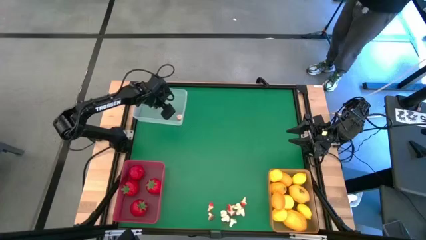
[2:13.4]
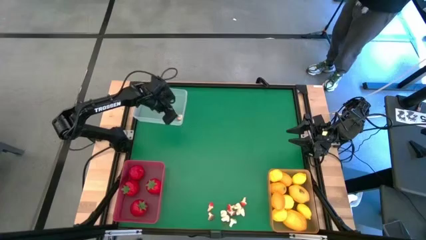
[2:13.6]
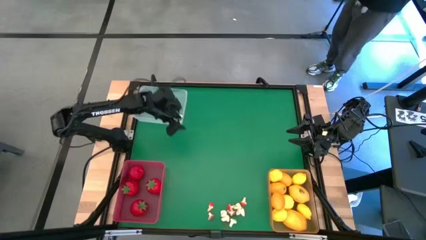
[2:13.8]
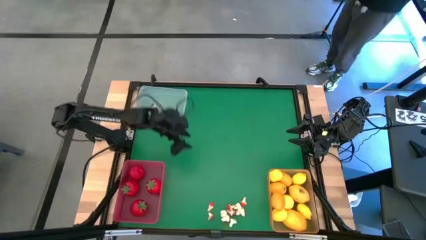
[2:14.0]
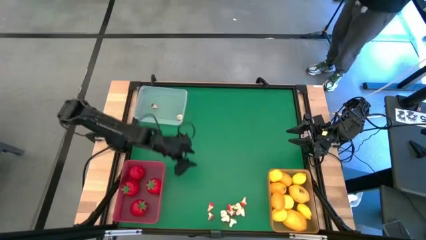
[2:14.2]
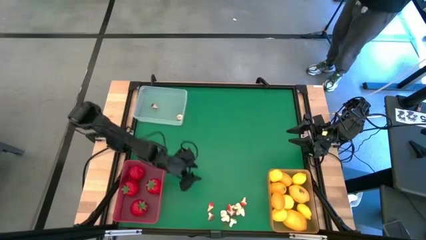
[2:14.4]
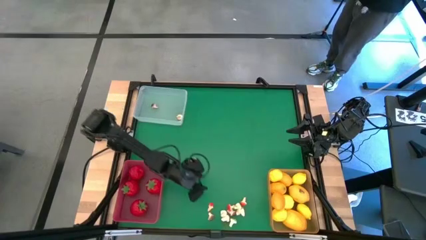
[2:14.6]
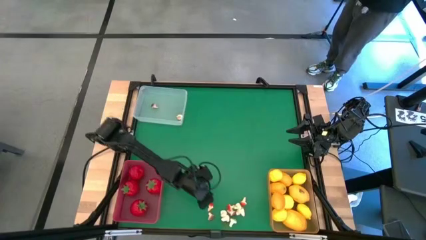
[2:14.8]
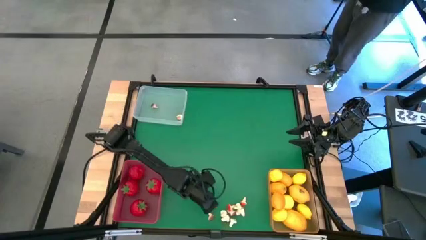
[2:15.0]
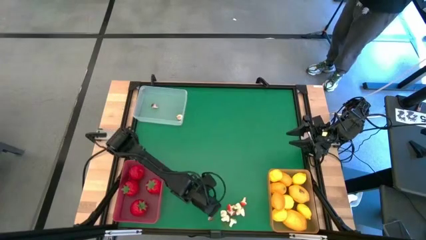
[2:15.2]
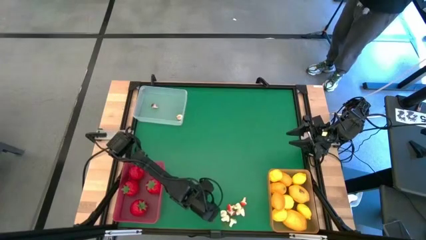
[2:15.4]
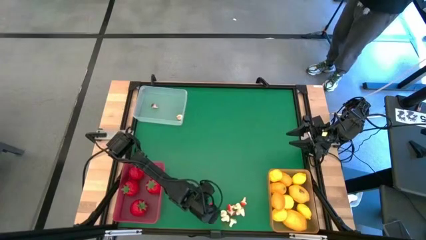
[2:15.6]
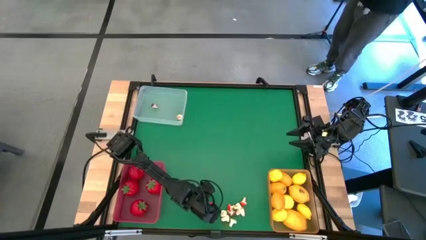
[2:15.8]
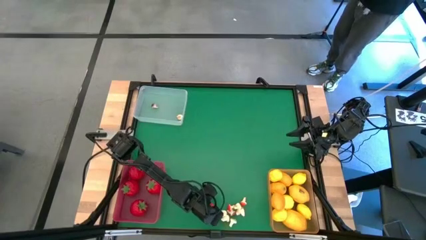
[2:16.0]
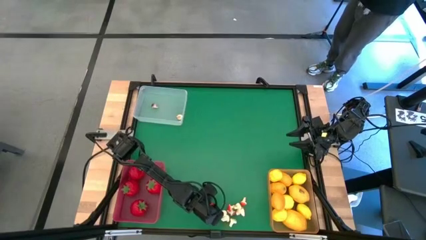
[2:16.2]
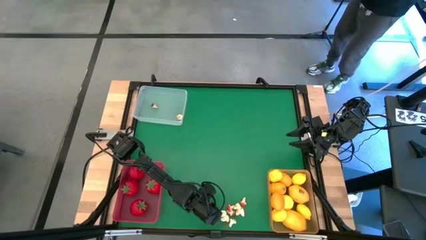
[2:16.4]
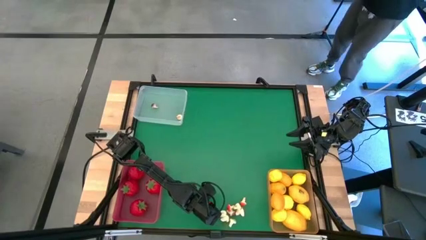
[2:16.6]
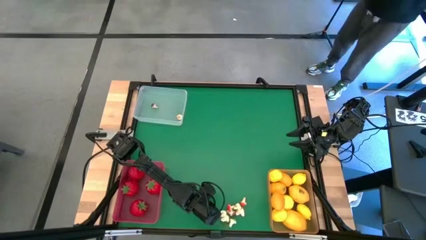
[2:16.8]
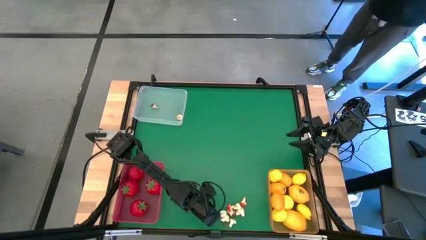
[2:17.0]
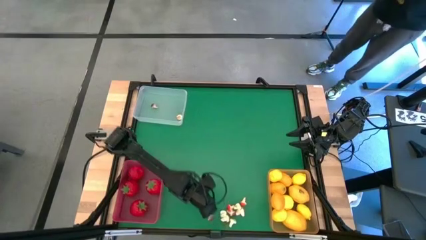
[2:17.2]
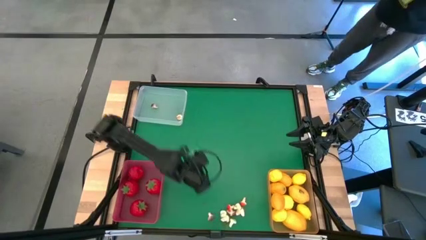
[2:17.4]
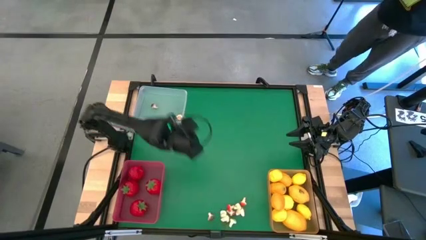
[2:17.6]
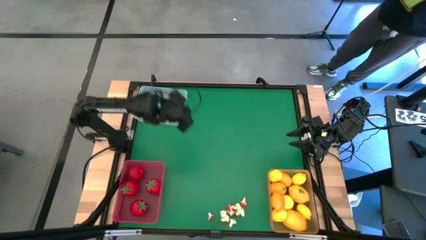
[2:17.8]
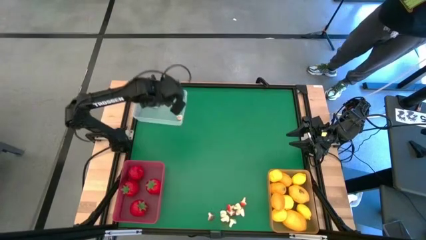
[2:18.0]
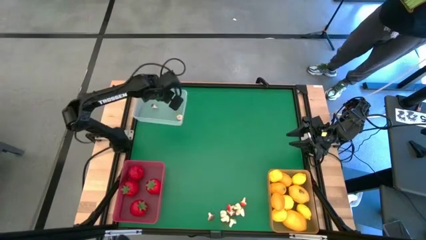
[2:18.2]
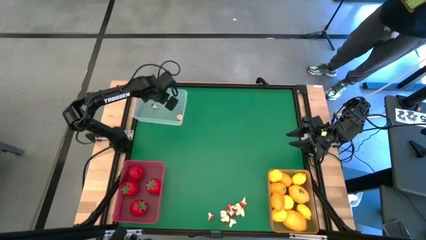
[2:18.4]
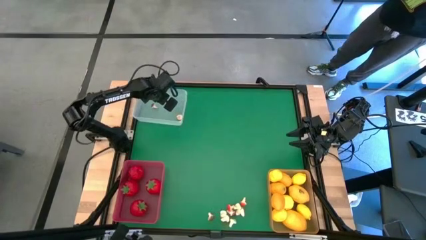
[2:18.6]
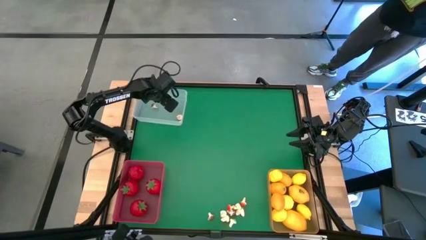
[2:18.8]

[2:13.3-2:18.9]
Task: Sort produce into baskets
Put the red mushroom into the white bin

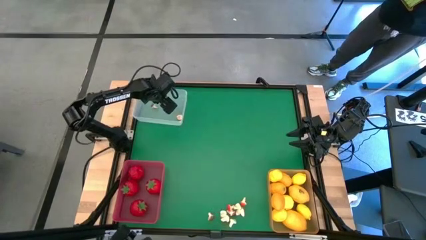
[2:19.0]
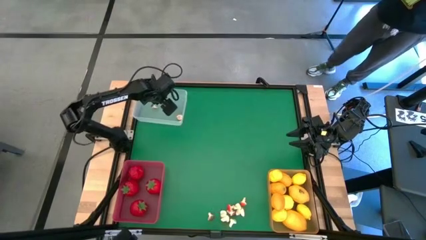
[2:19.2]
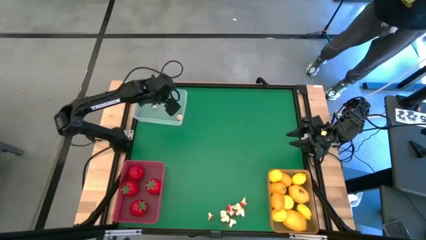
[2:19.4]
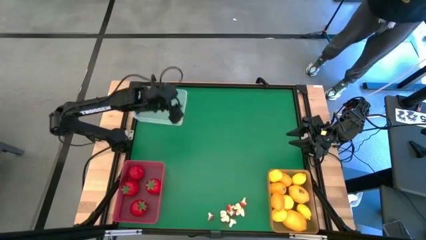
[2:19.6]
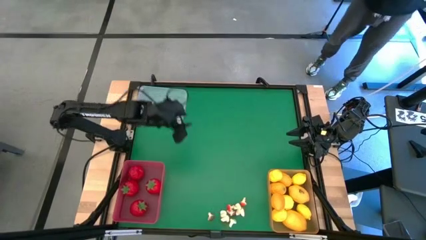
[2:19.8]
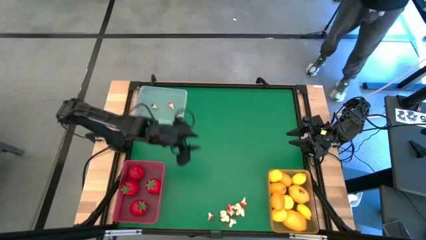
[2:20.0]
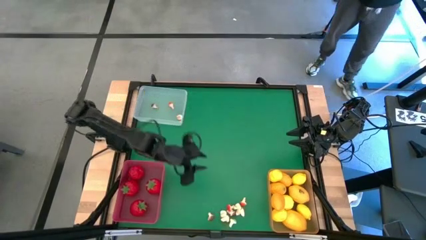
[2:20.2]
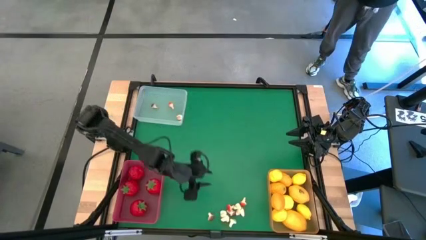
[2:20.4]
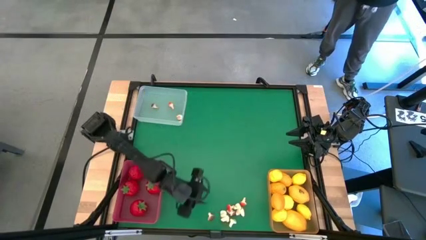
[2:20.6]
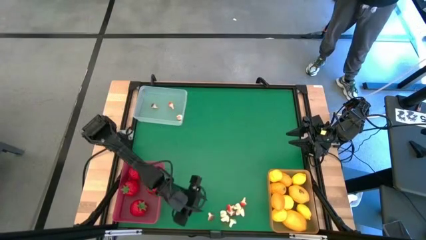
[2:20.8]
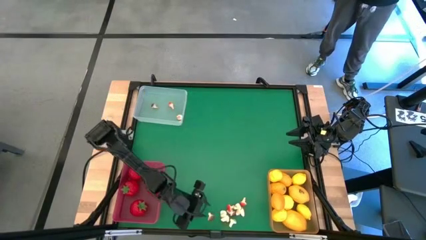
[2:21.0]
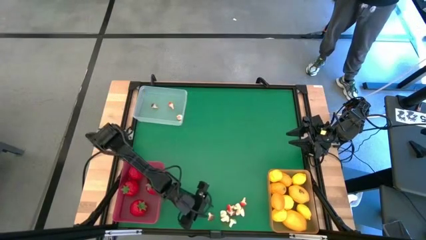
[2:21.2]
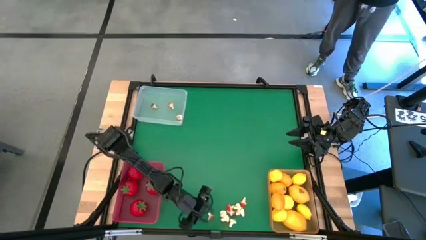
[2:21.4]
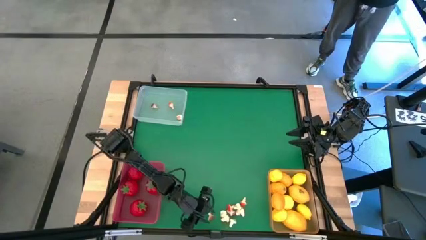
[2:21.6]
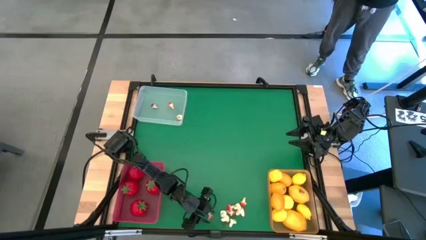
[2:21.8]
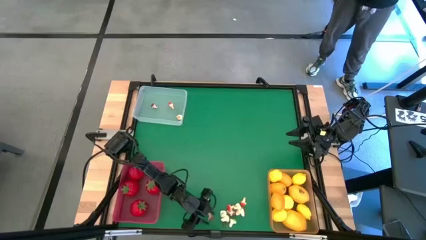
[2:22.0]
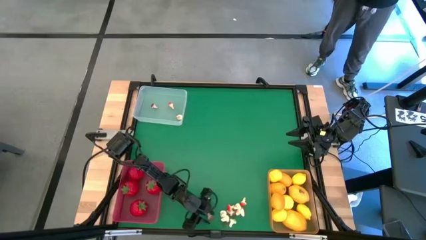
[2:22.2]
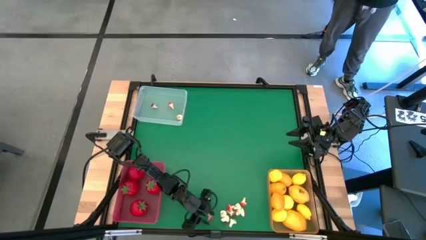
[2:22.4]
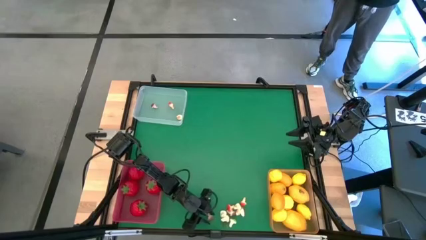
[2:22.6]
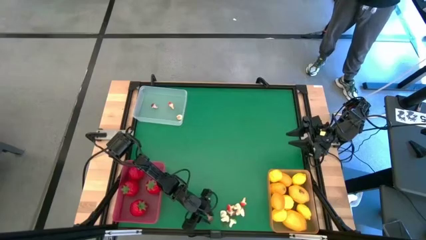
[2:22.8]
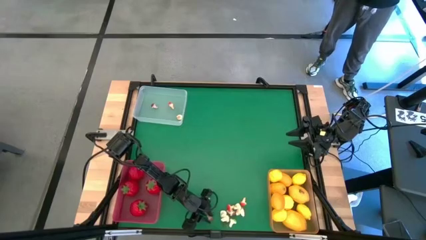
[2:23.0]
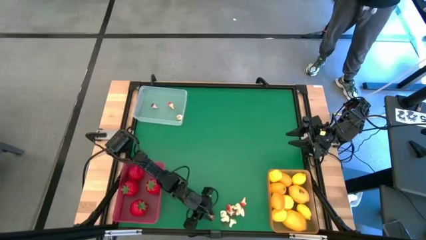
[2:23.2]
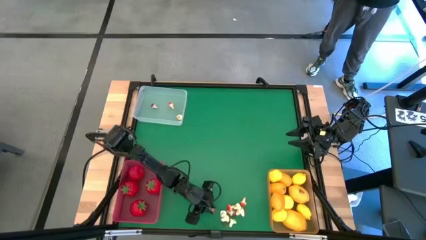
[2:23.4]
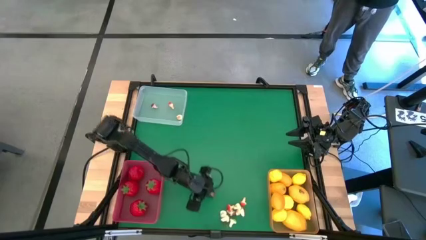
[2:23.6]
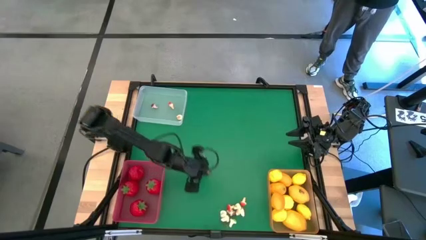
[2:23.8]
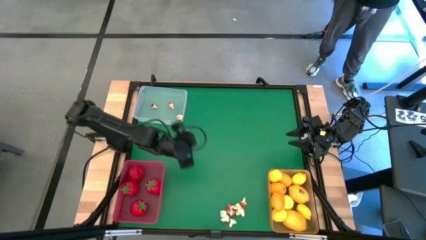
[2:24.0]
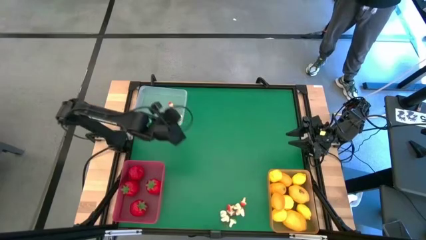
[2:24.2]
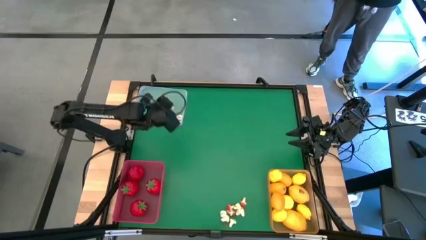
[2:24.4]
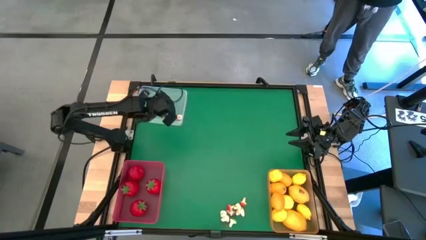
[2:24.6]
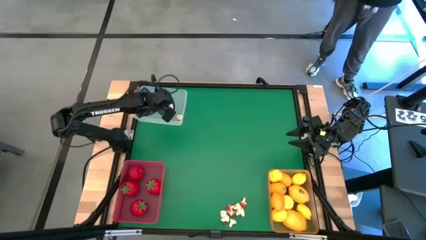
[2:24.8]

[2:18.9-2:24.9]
Put the brown mushroom into the white bin
